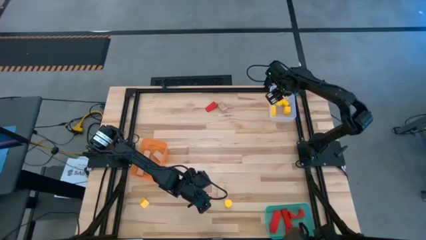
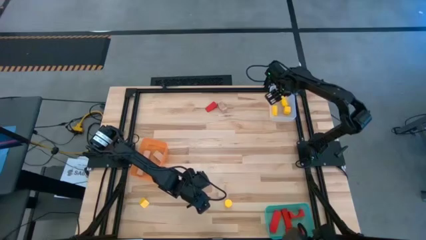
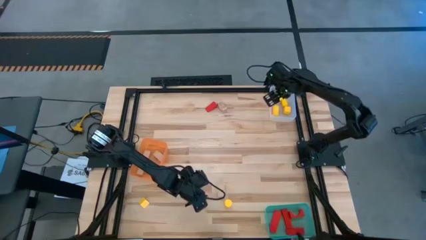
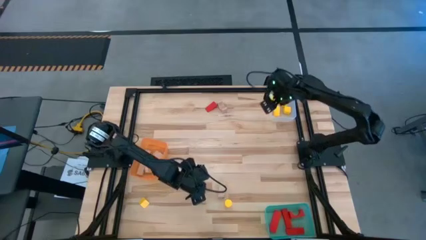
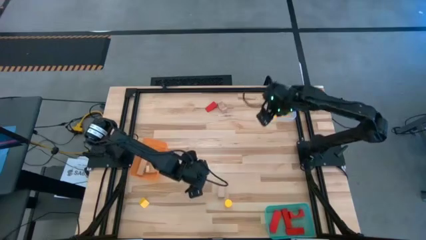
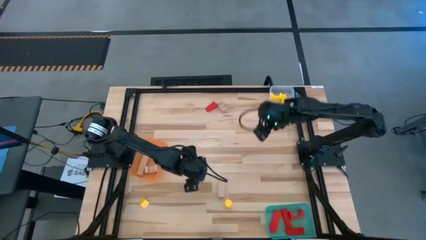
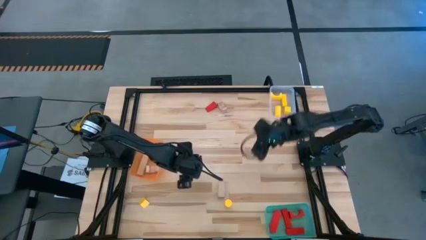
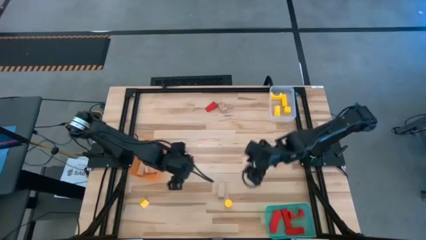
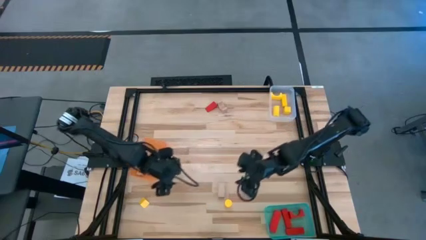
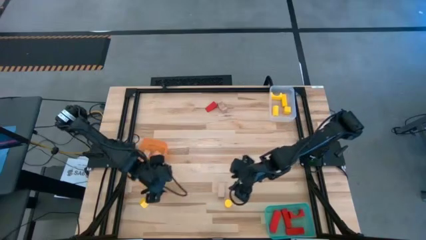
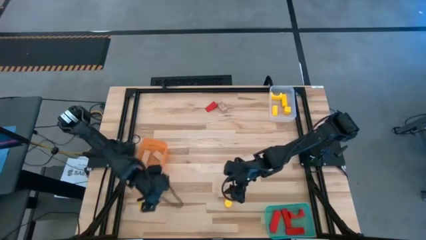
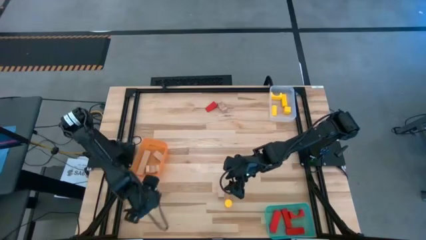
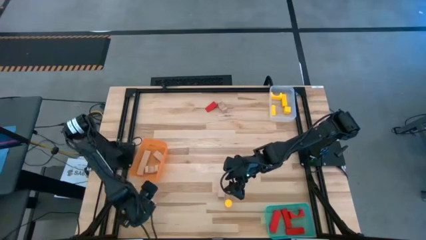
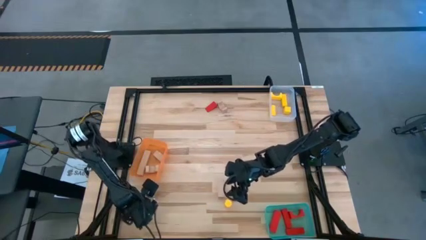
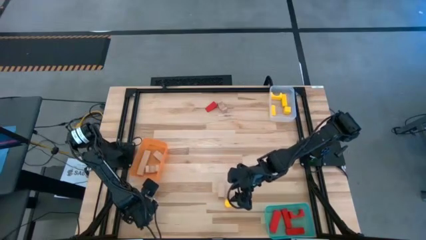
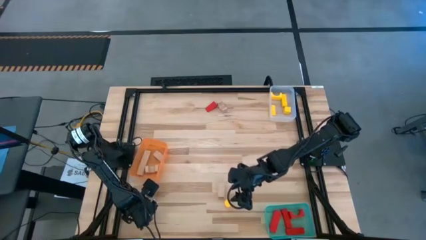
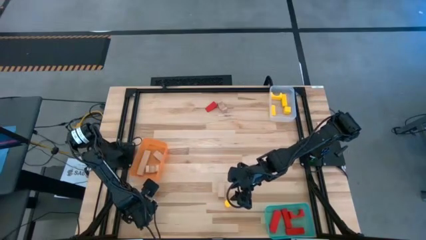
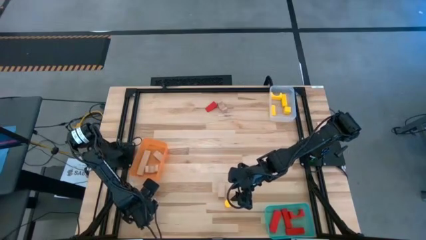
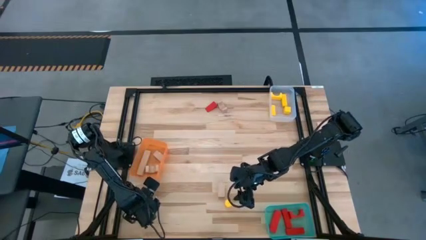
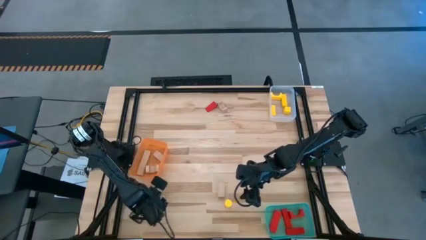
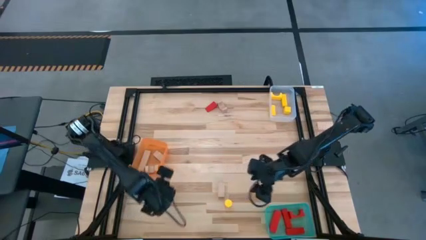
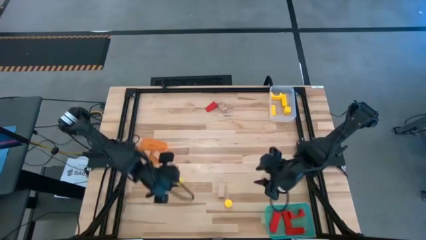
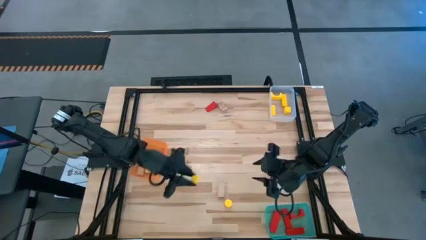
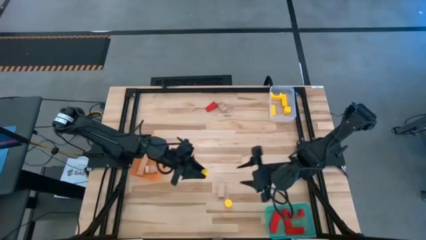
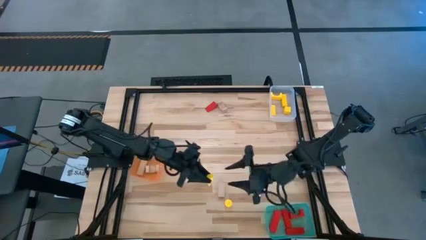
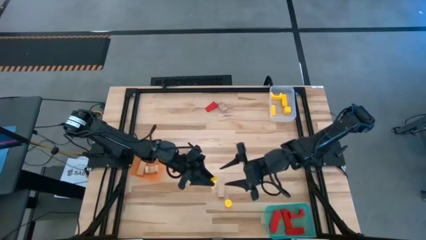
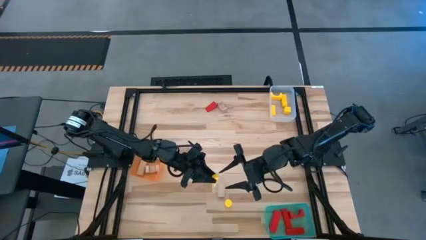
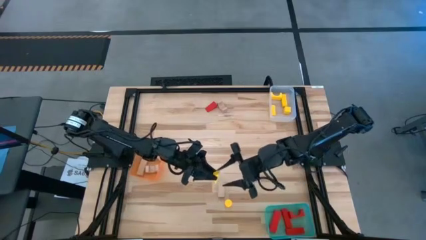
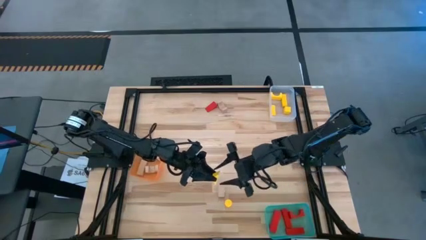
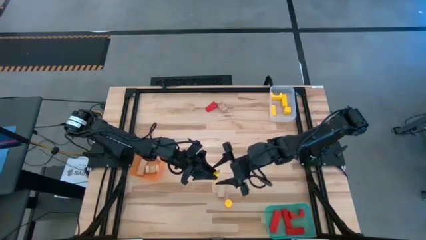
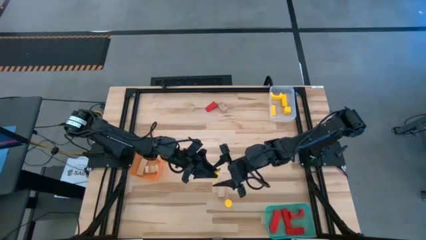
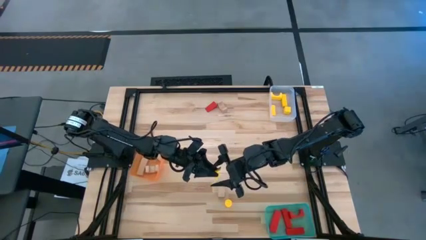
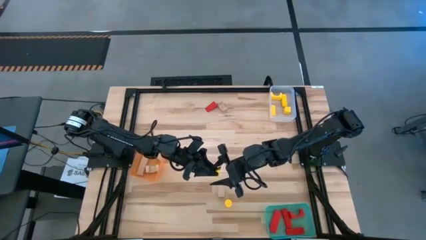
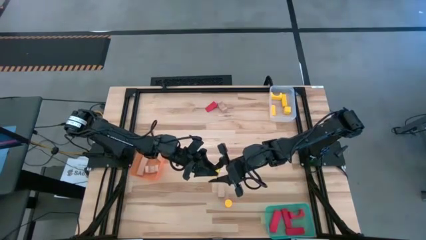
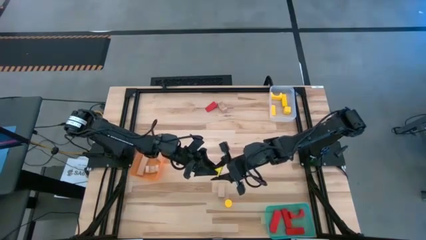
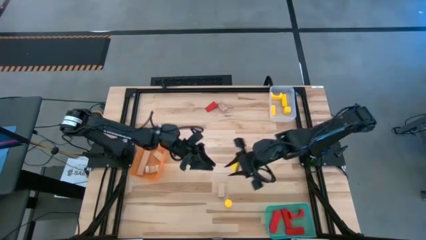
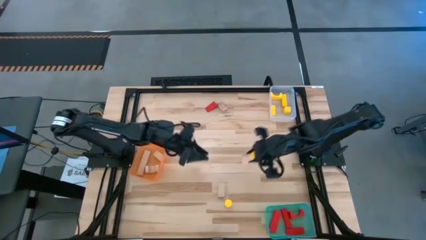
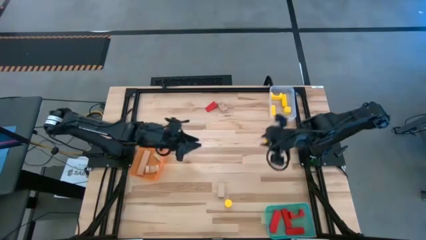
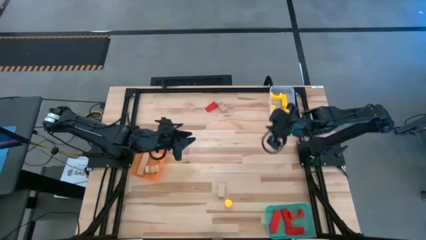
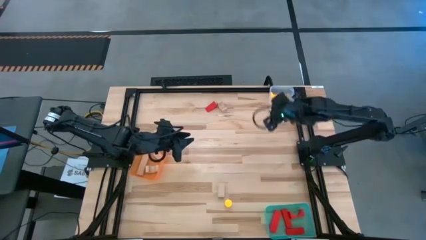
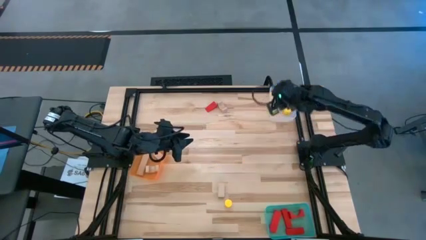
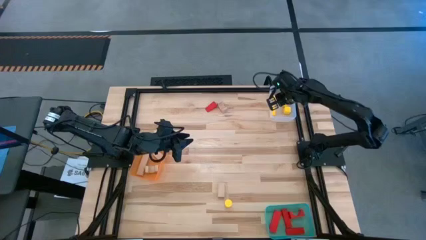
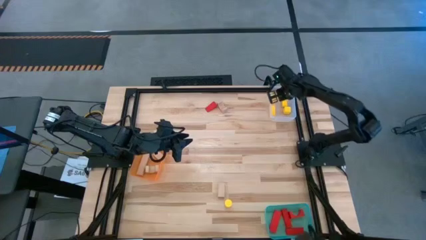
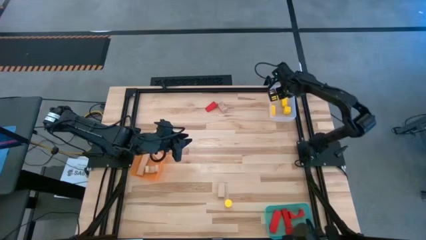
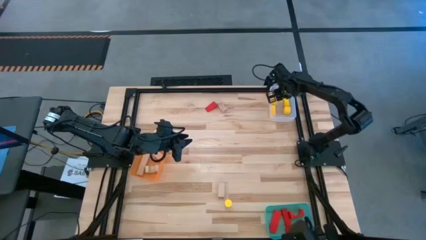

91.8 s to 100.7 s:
Task: Sort & place blocks by color
Put the yellow block into the transparent bin

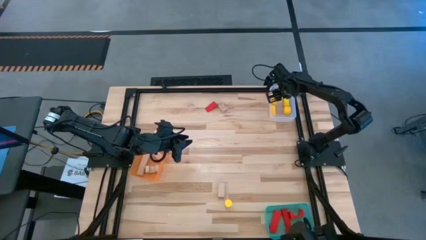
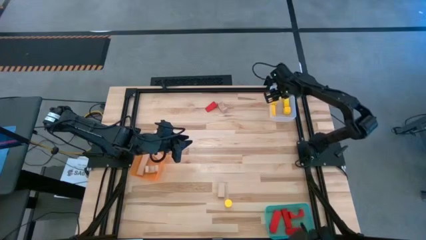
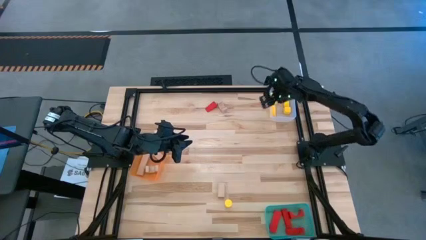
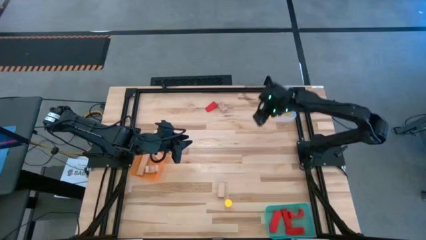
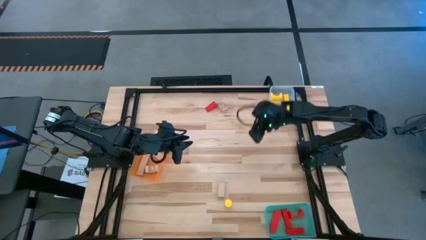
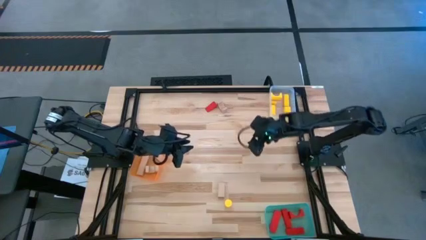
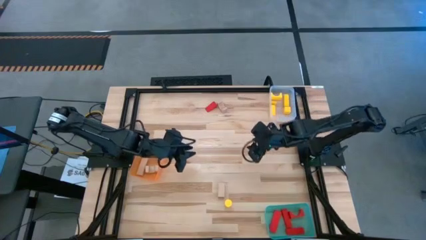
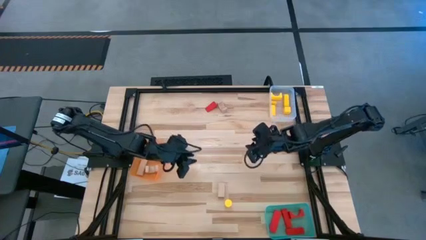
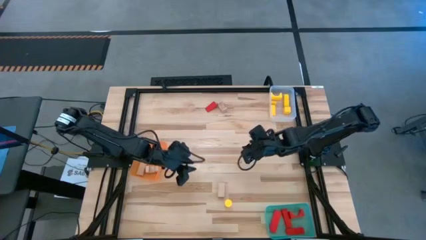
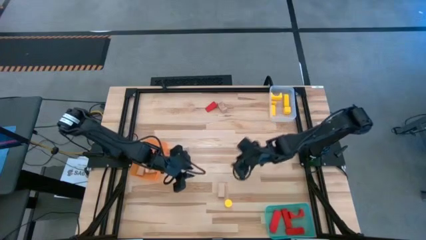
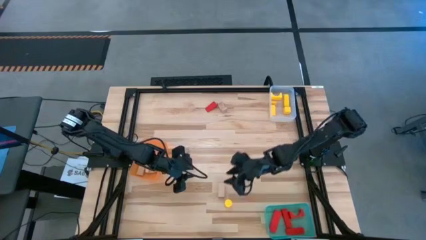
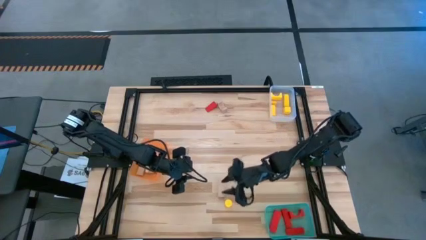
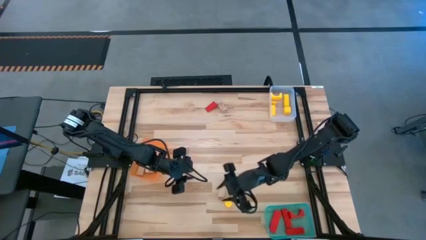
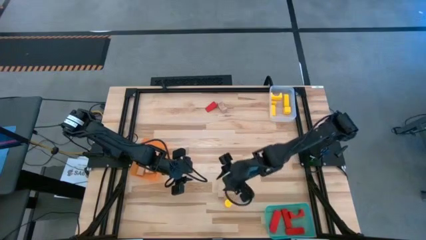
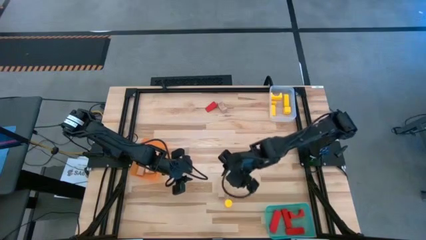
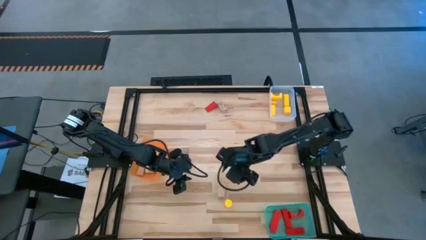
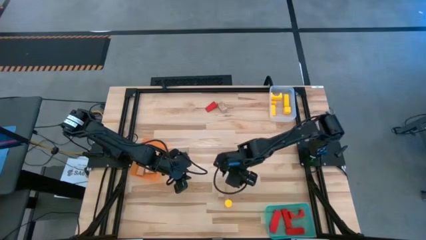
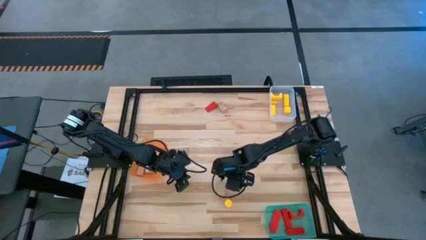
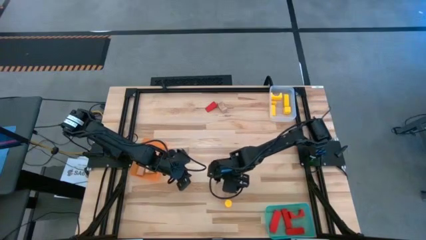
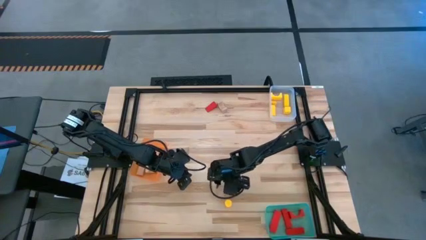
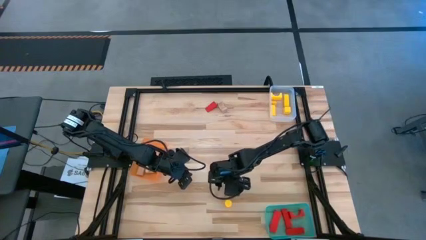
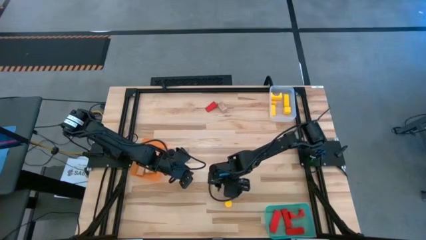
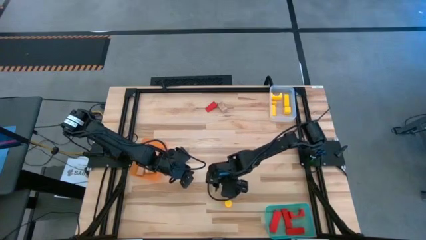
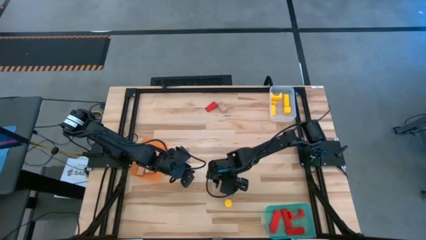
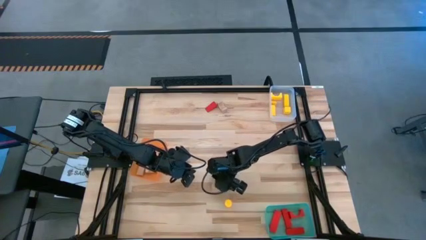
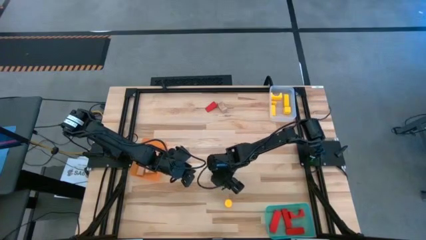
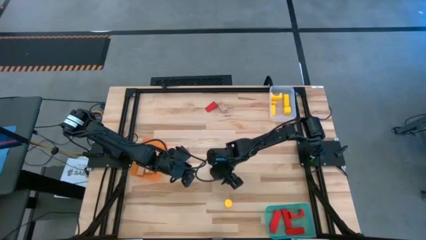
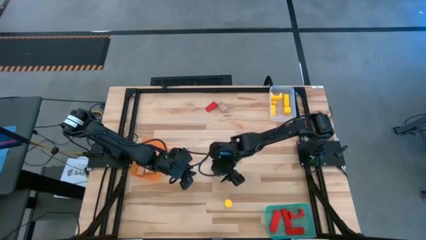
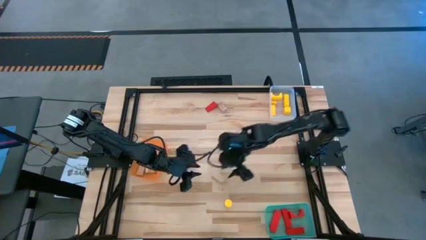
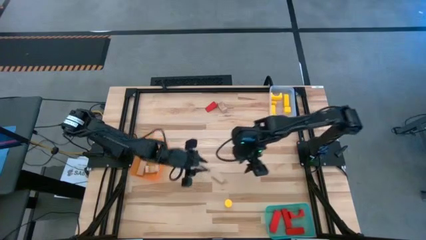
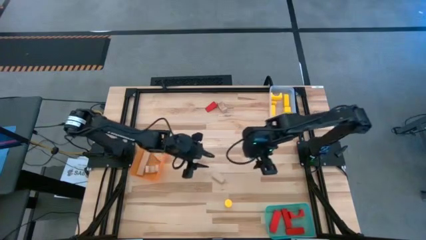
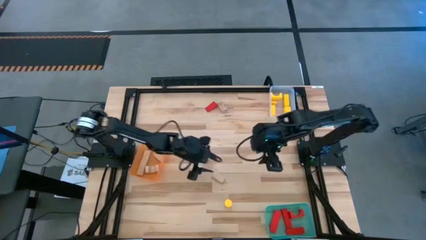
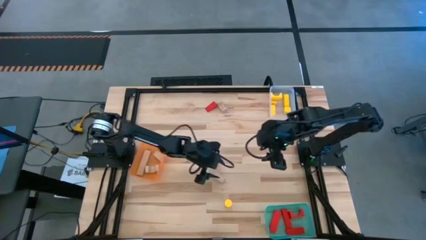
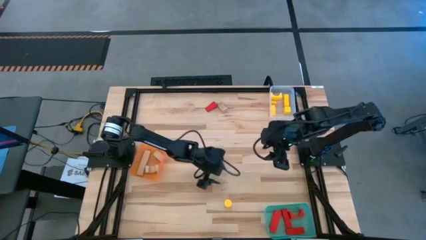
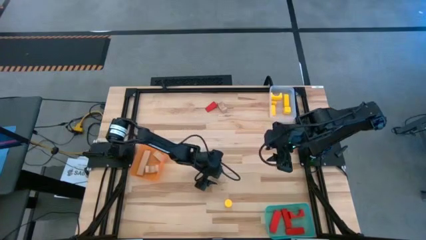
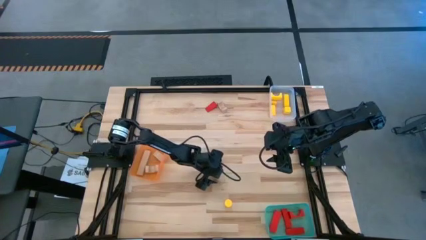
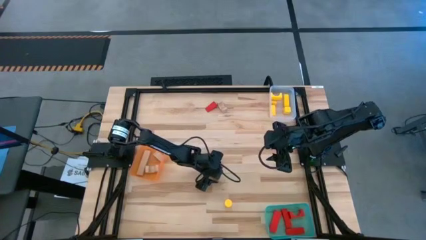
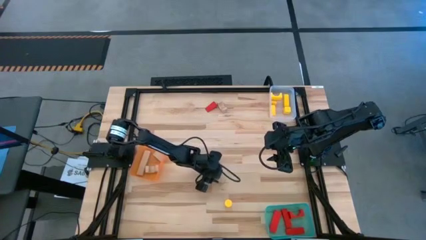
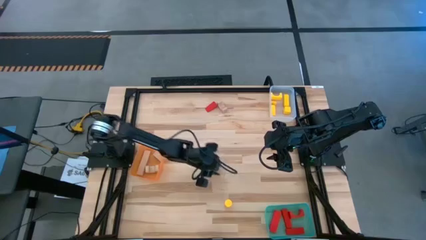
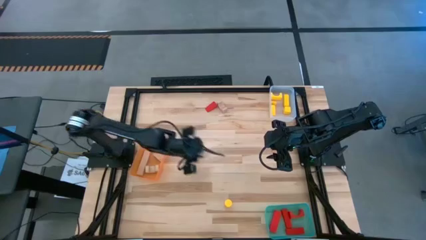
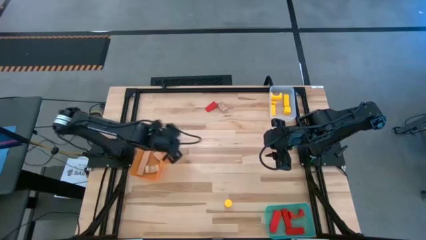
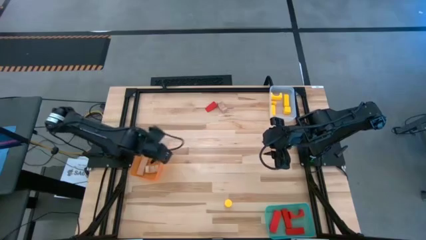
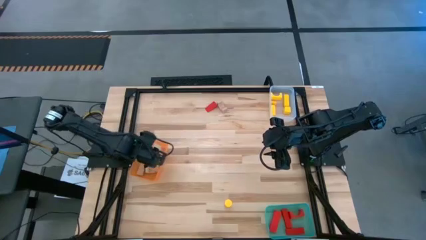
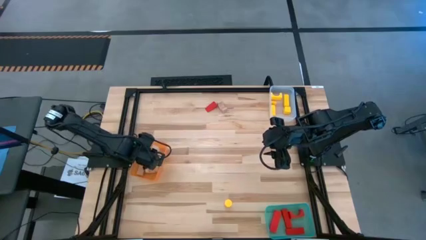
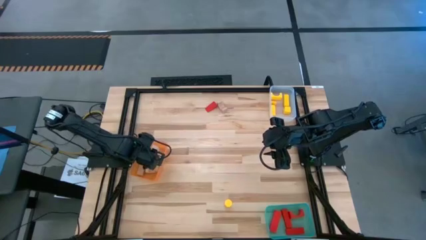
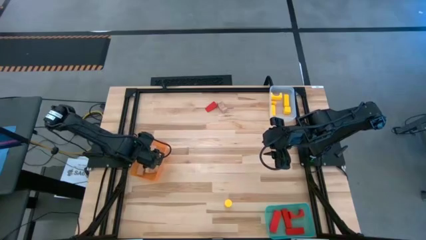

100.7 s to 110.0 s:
Put the brown block into the orange bin
